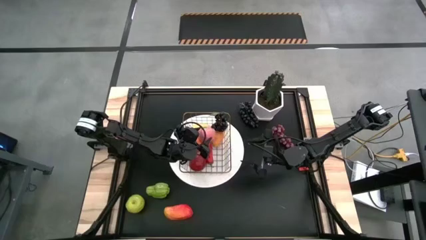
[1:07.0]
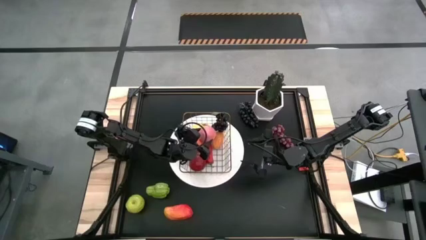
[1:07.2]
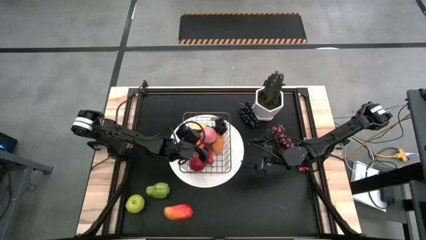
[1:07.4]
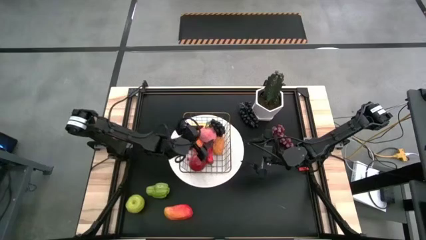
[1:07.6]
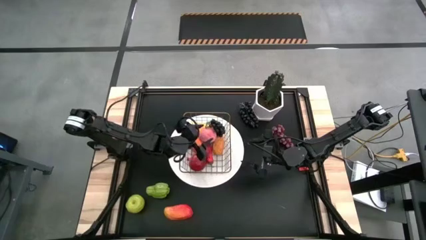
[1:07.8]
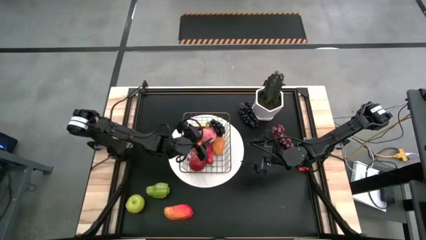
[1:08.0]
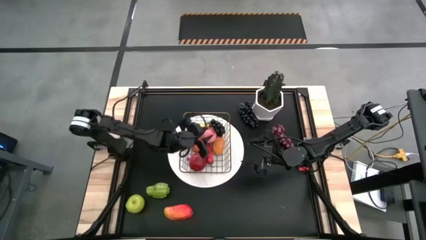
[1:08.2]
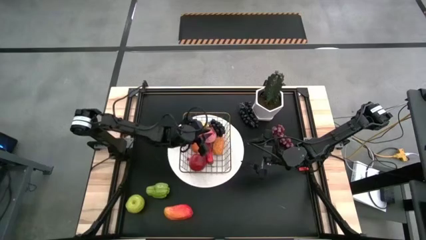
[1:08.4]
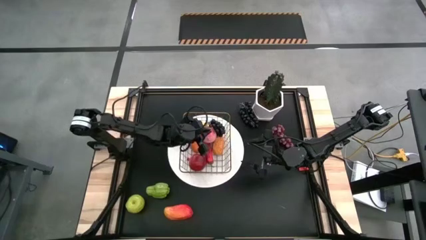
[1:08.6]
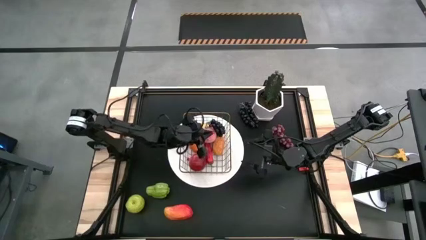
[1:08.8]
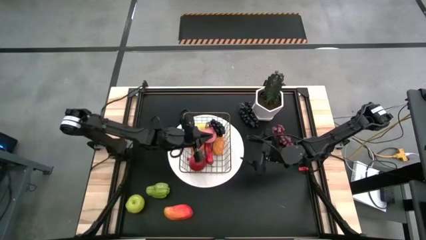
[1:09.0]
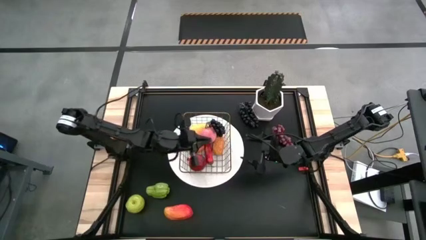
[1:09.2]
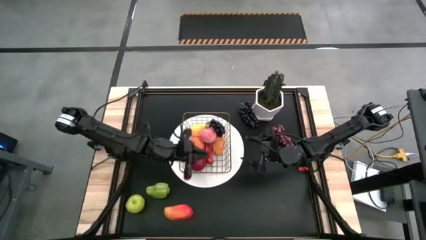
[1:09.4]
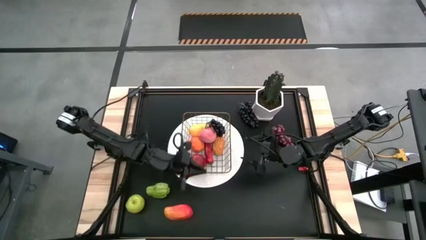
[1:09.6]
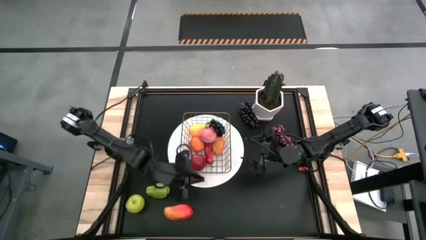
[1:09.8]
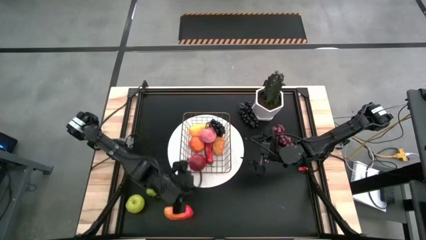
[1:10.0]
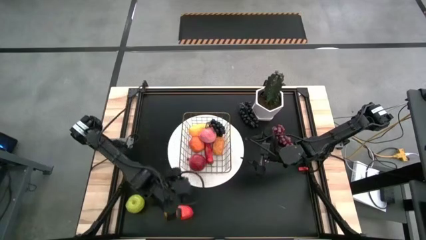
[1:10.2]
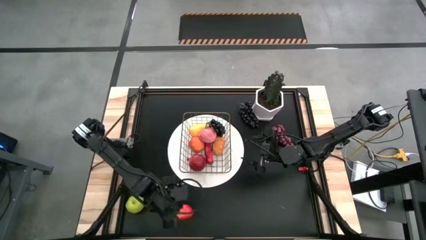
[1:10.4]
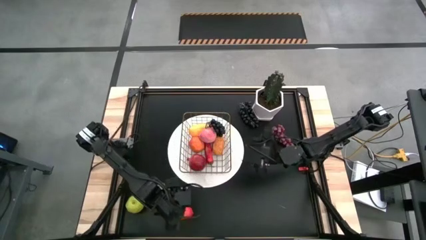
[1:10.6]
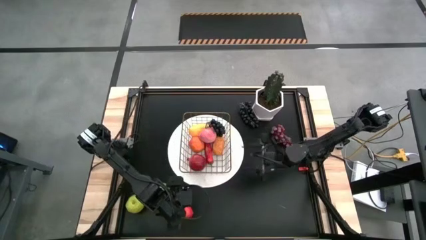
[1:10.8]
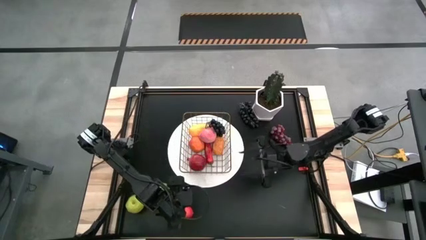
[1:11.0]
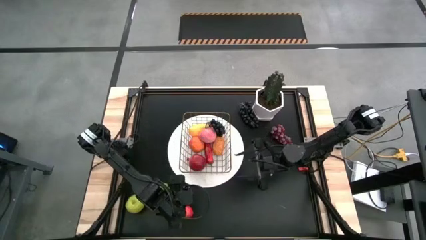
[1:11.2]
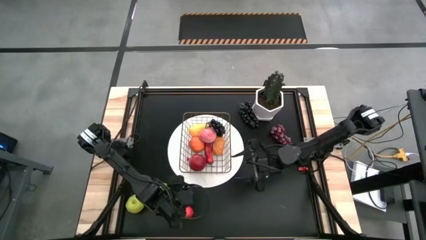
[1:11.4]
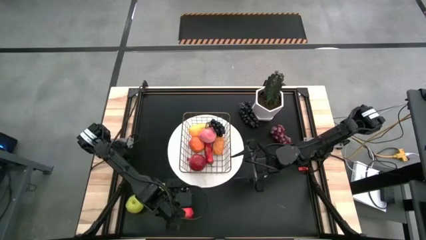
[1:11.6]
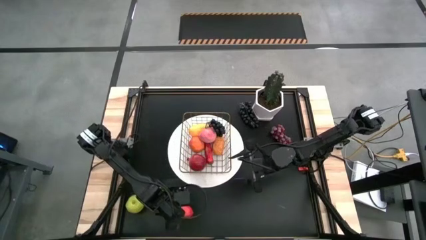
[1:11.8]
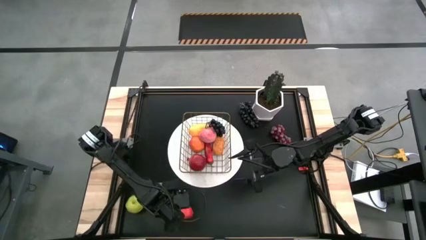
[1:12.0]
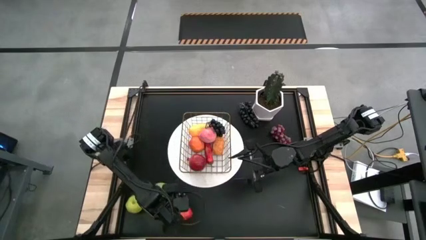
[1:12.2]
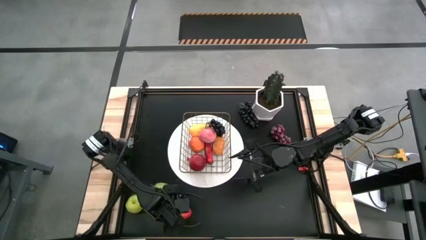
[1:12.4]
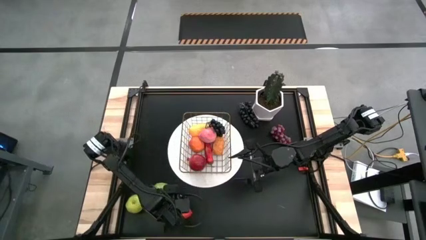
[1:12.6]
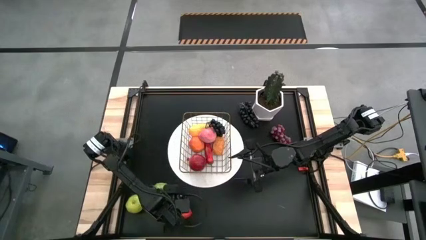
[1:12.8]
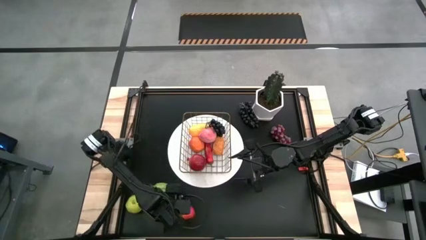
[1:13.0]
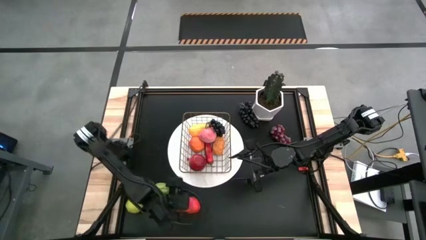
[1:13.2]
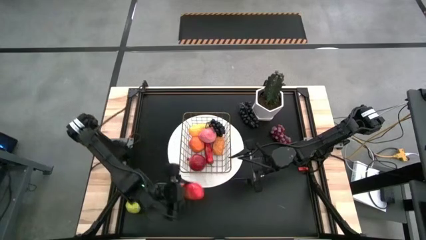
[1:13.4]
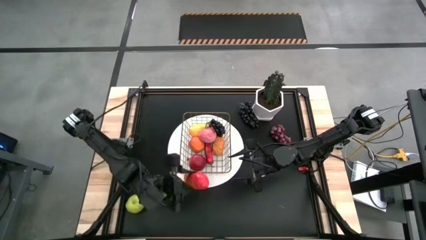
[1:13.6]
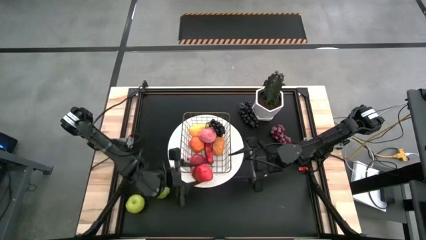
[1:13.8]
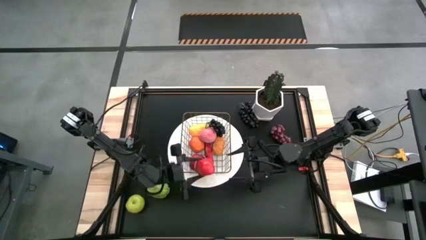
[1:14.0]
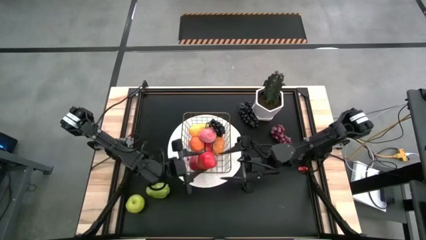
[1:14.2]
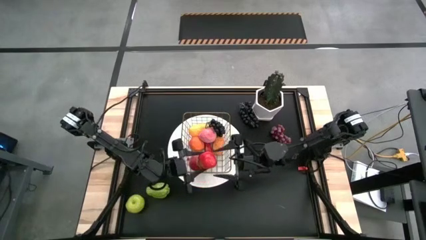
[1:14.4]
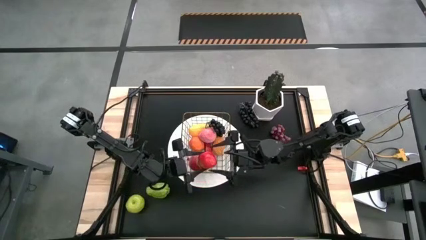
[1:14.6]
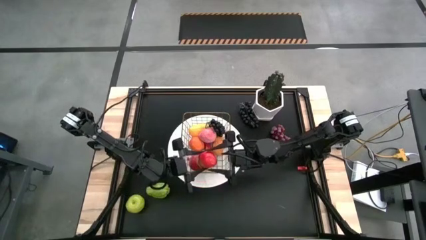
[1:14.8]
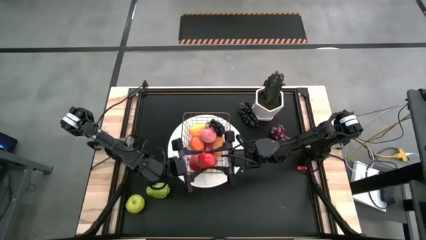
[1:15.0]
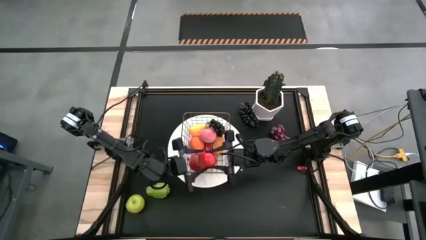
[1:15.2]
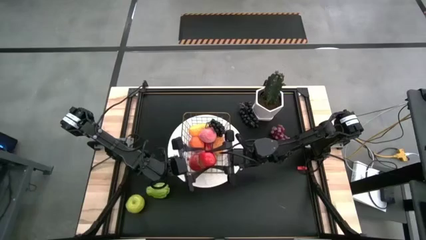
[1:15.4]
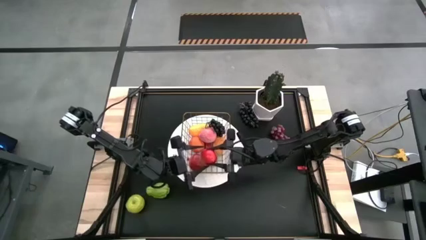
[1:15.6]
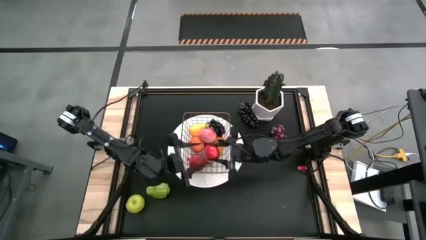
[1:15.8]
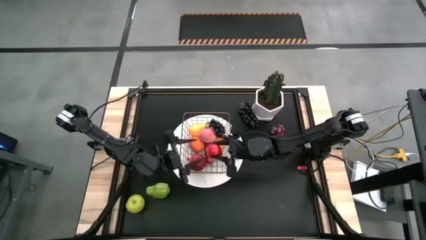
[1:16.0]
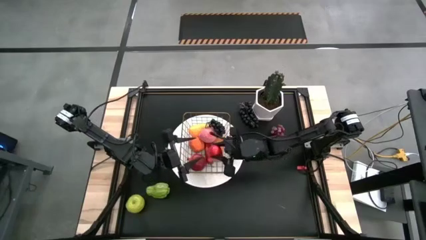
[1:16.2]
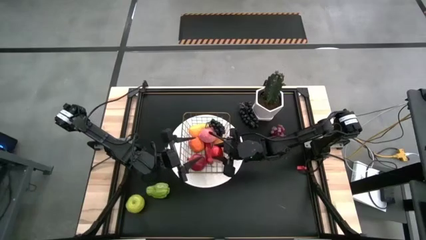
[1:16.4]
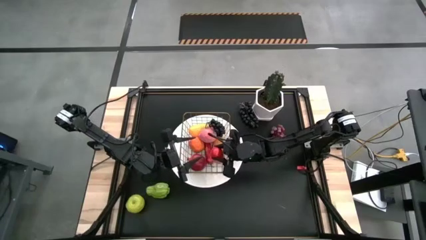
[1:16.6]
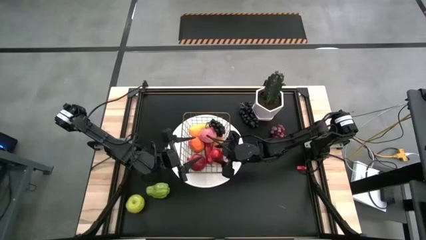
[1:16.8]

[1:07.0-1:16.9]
Task: Build produce basket
Put the red mango into the wire basket

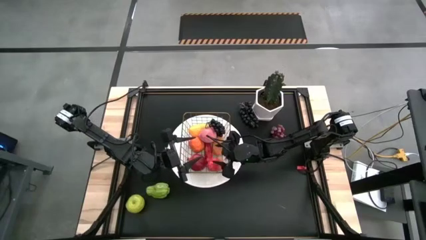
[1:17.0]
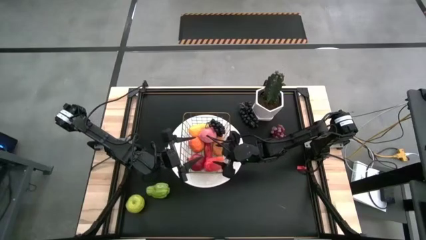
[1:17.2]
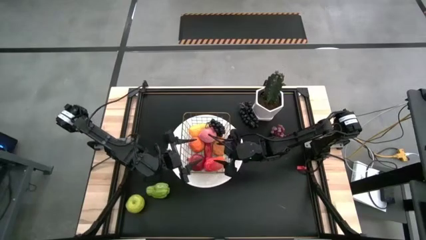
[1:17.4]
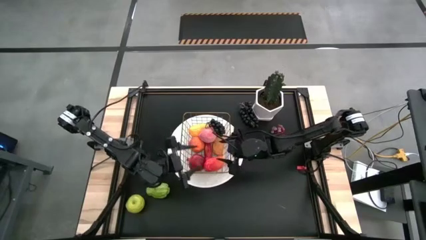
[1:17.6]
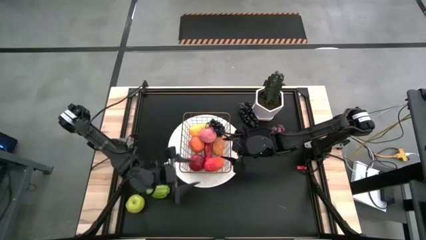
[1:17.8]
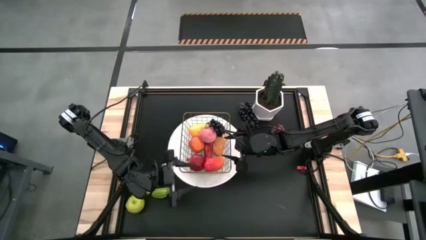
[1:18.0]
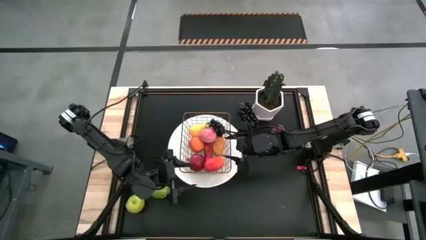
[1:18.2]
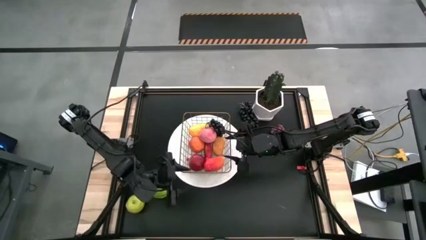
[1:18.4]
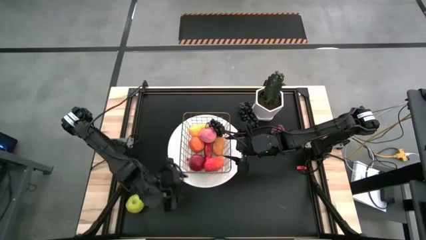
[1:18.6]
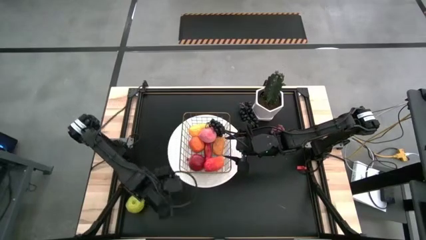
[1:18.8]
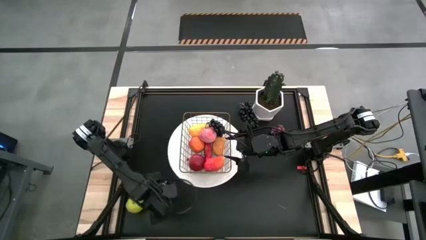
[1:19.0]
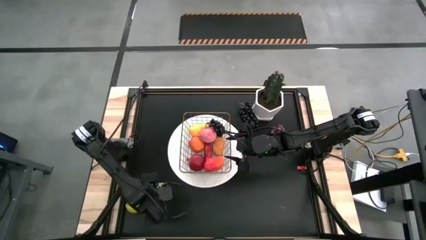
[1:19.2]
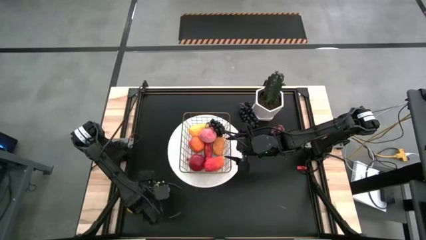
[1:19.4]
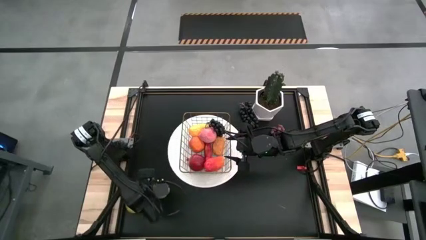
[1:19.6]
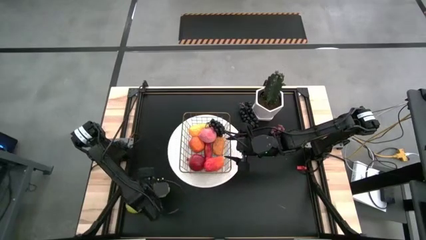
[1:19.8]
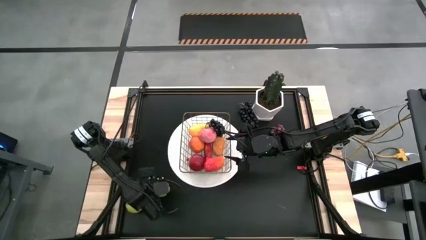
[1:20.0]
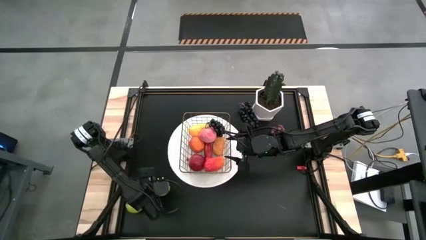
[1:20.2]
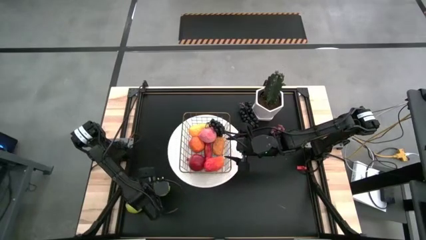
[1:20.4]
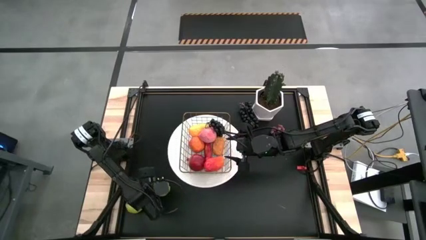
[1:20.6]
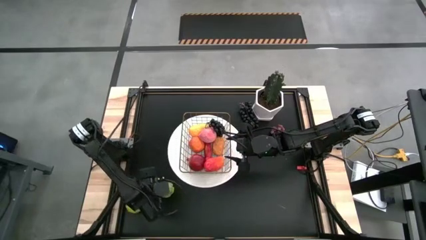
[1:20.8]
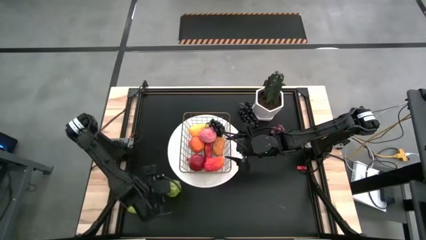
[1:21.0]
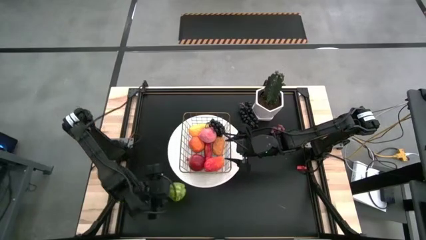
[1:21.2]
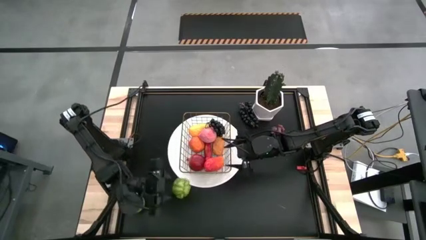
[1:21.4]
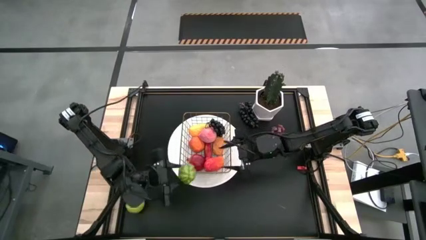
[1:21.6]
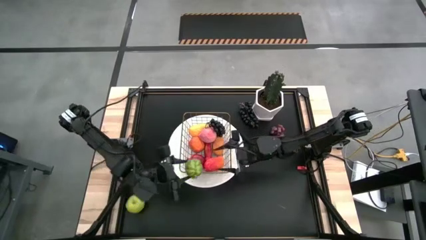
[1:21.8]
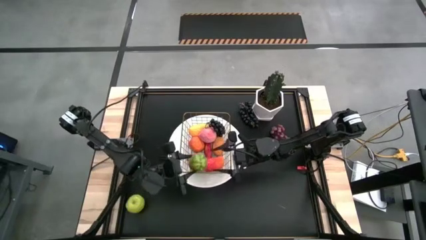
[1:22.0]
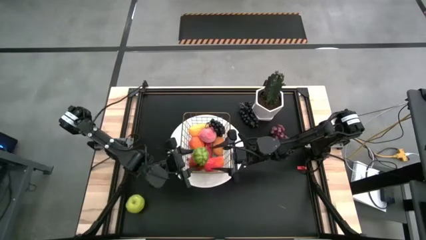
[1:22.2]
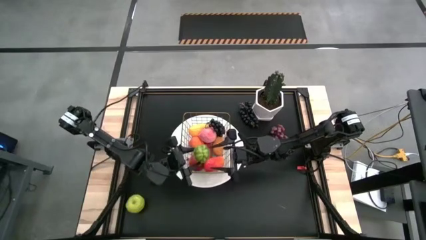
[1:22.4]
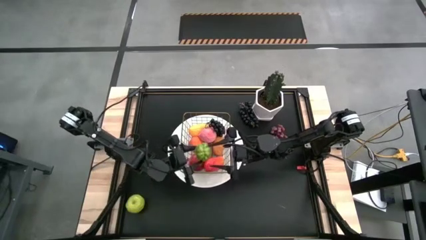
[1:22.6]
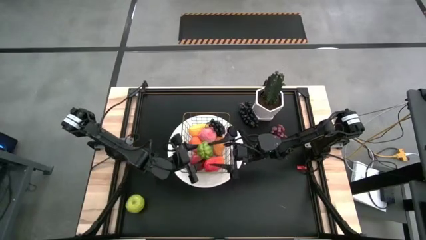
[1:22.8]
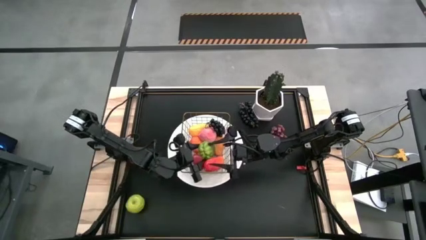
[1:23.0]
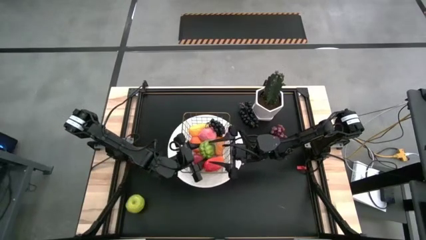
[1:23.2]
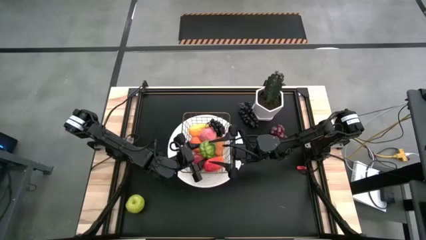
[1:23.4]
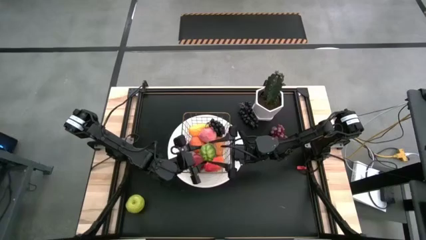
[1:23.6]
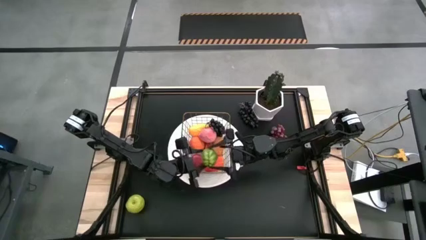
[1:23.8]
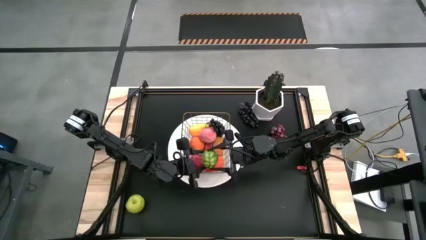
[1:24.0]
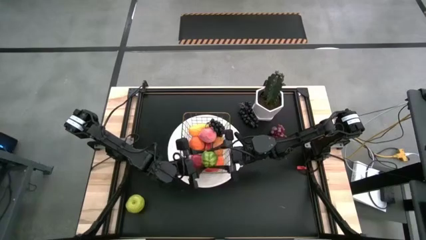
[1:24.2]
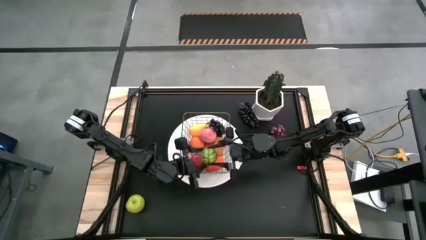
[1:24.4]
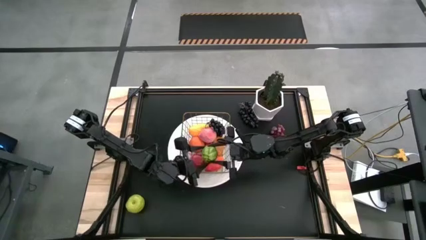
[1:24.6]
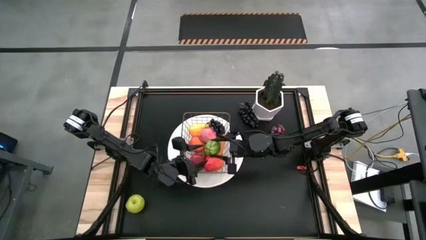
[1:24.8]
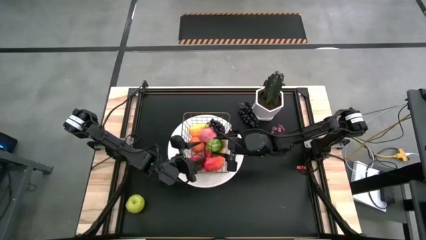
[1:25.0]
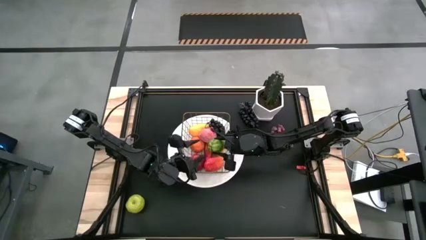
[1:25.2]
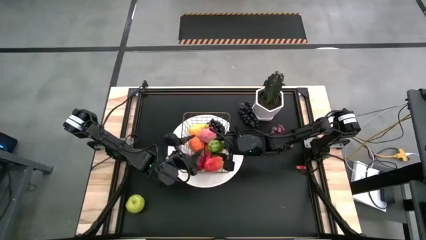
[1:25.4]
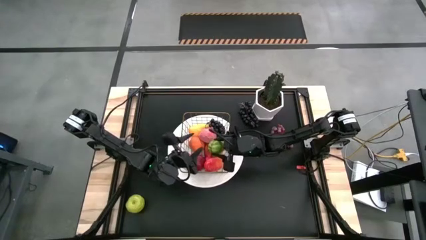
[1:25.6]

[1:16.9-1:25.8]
Put the chayote into the wire basket
